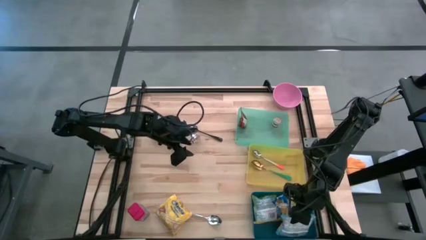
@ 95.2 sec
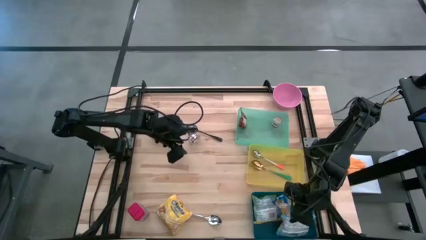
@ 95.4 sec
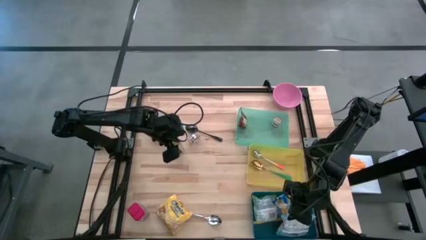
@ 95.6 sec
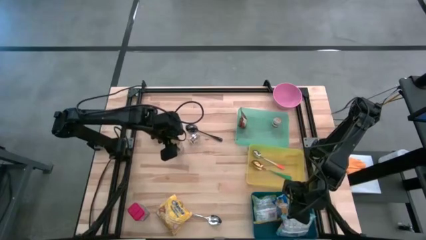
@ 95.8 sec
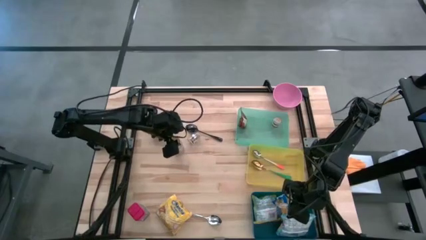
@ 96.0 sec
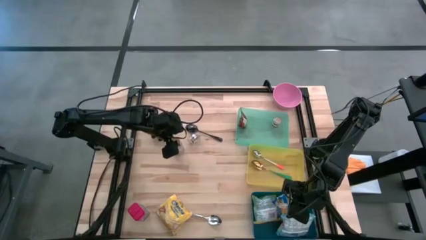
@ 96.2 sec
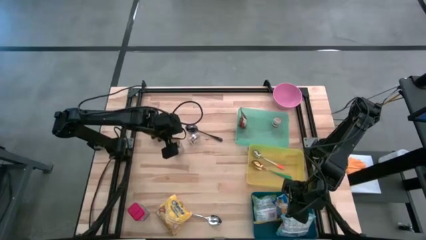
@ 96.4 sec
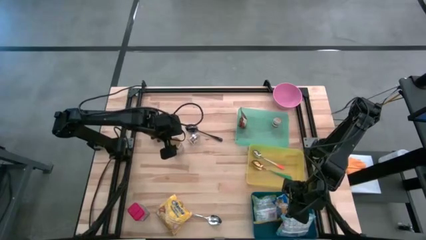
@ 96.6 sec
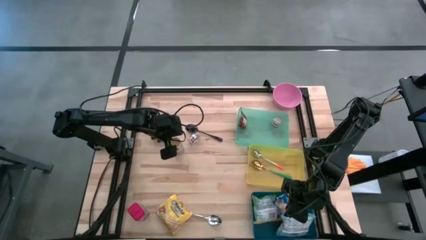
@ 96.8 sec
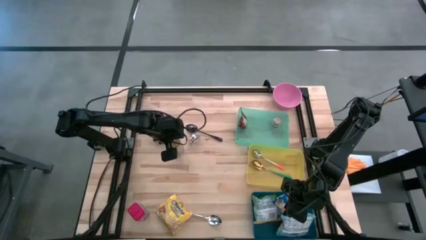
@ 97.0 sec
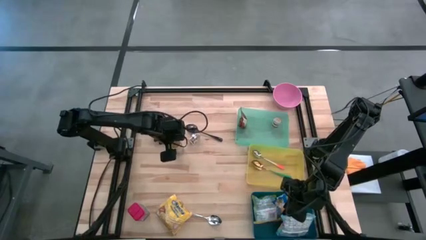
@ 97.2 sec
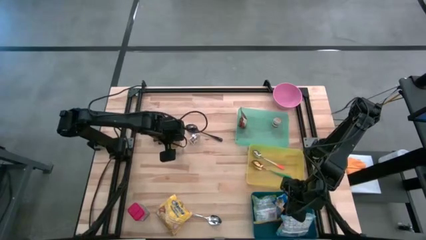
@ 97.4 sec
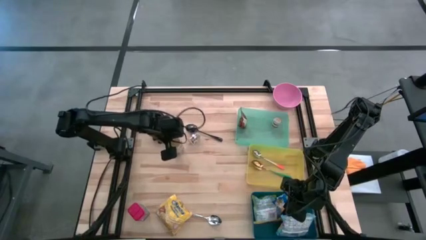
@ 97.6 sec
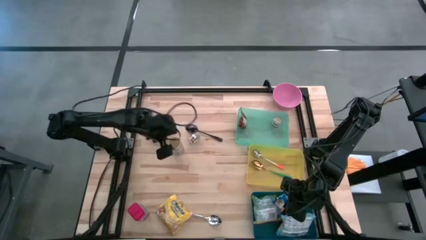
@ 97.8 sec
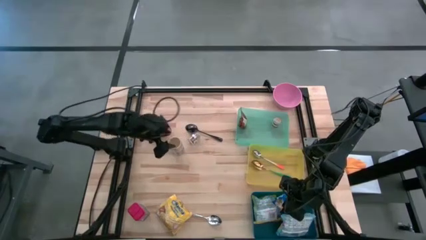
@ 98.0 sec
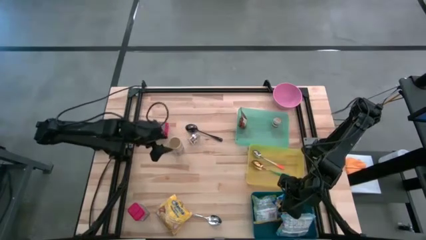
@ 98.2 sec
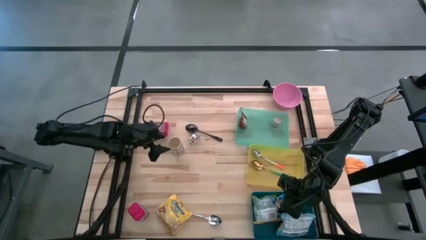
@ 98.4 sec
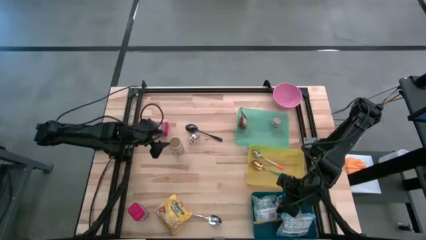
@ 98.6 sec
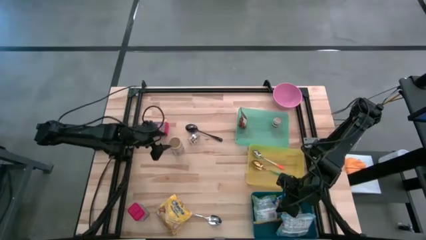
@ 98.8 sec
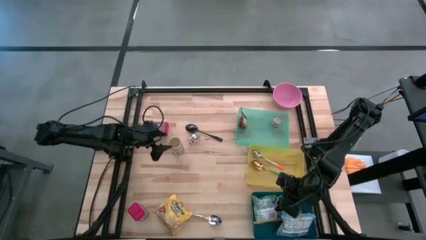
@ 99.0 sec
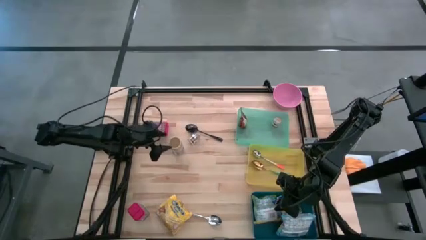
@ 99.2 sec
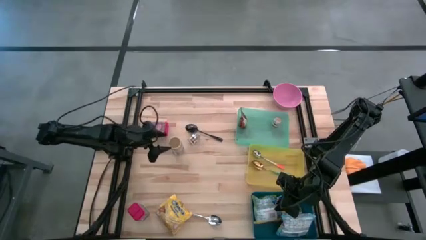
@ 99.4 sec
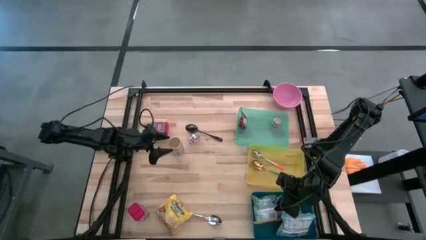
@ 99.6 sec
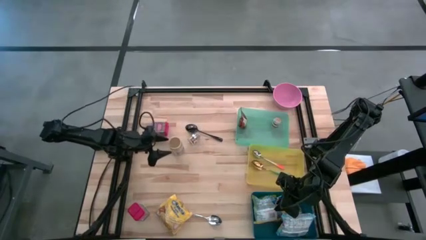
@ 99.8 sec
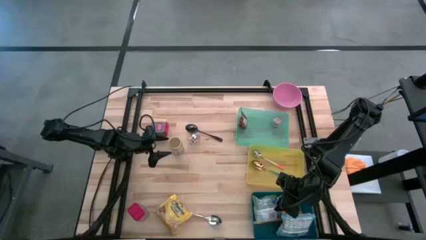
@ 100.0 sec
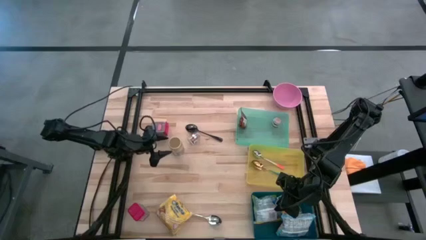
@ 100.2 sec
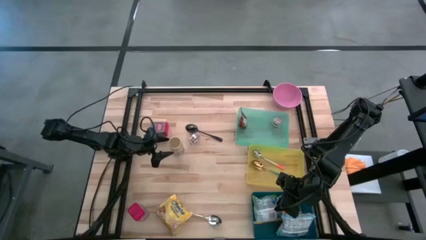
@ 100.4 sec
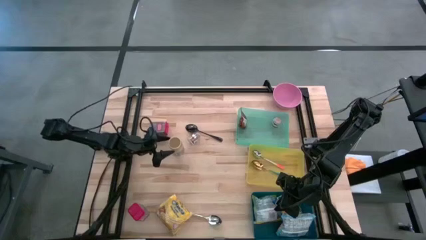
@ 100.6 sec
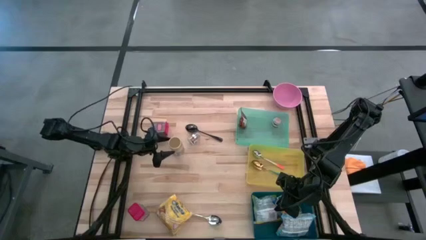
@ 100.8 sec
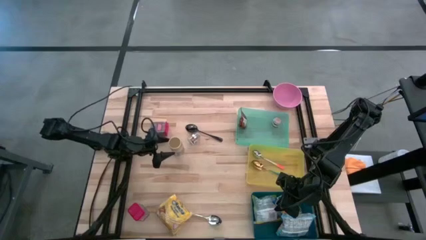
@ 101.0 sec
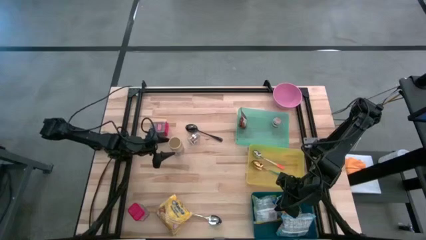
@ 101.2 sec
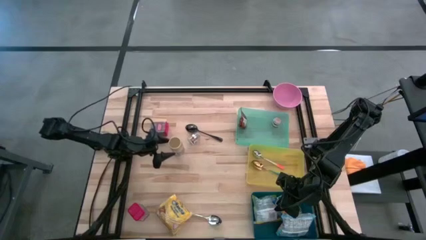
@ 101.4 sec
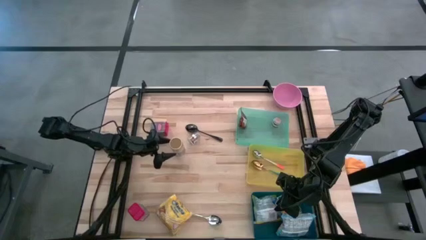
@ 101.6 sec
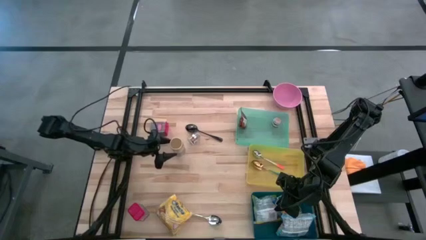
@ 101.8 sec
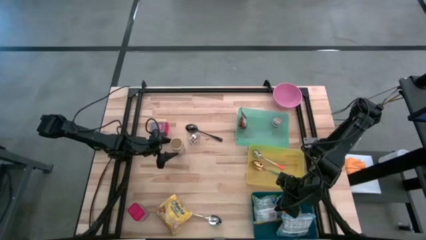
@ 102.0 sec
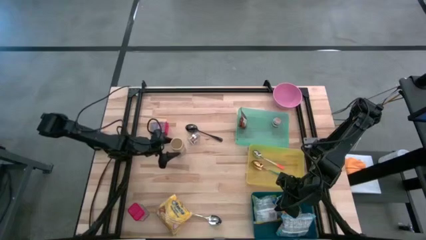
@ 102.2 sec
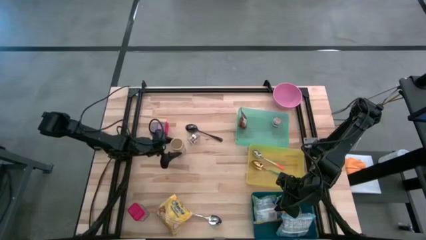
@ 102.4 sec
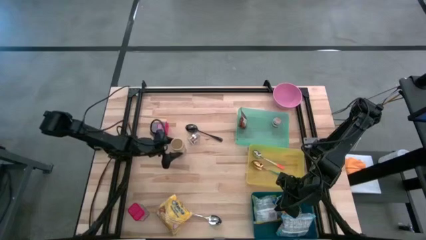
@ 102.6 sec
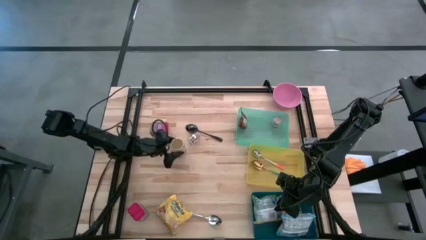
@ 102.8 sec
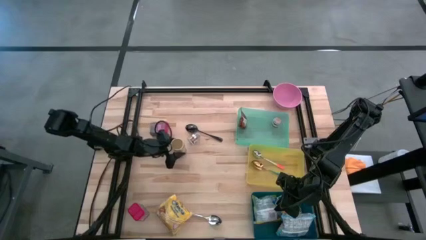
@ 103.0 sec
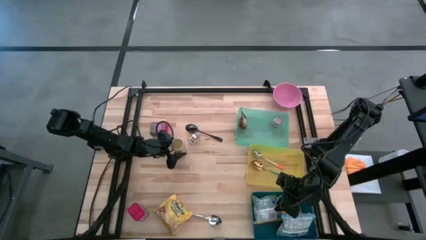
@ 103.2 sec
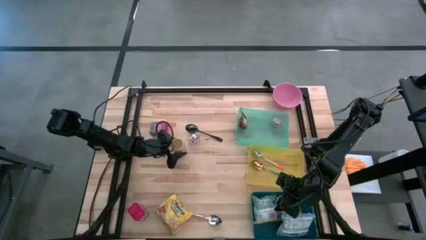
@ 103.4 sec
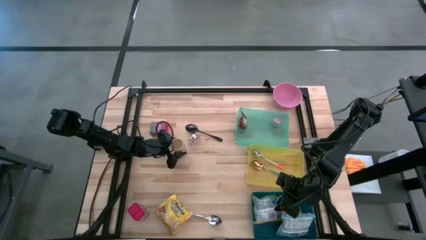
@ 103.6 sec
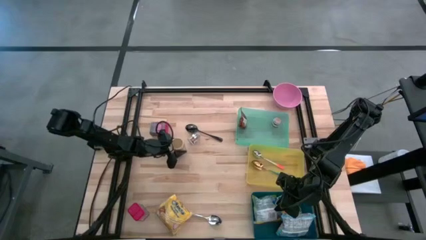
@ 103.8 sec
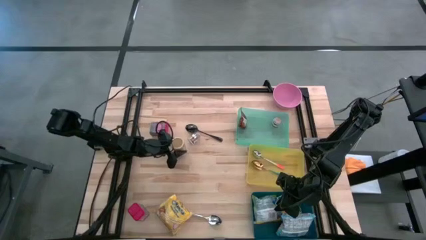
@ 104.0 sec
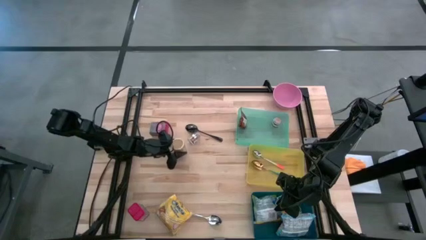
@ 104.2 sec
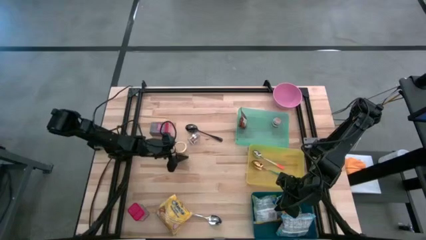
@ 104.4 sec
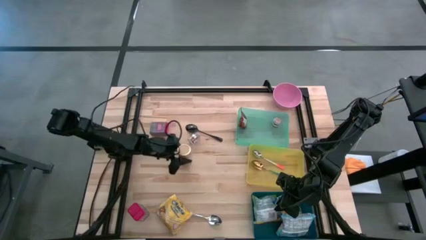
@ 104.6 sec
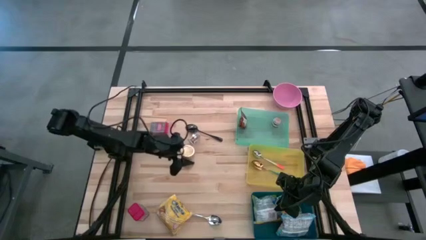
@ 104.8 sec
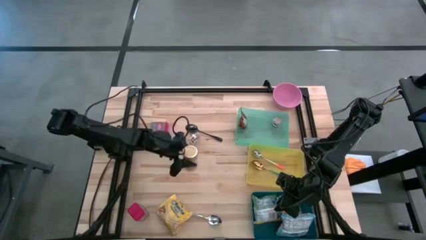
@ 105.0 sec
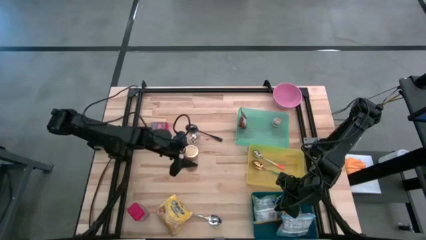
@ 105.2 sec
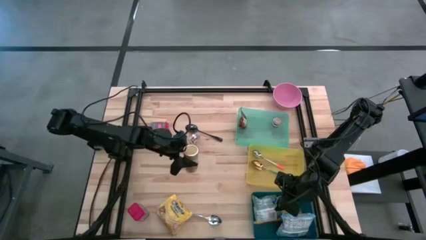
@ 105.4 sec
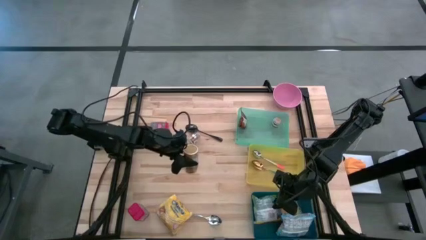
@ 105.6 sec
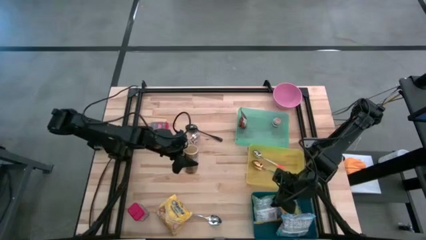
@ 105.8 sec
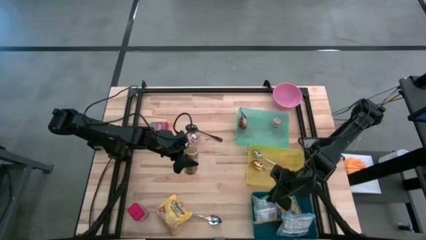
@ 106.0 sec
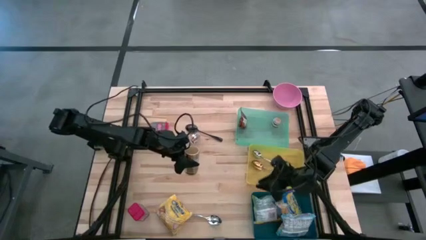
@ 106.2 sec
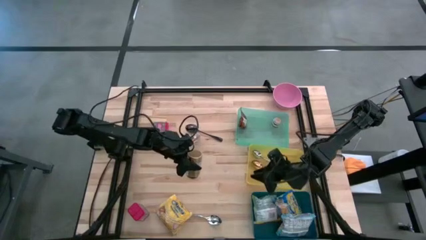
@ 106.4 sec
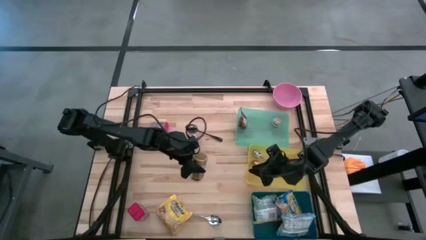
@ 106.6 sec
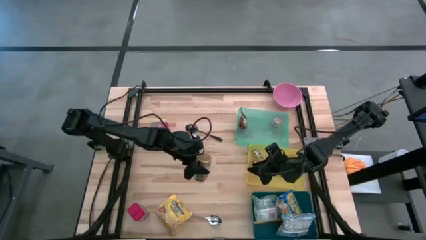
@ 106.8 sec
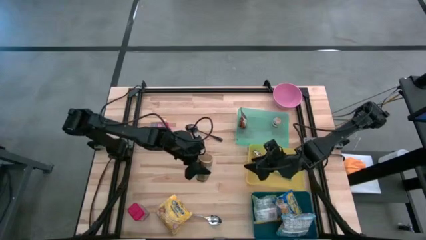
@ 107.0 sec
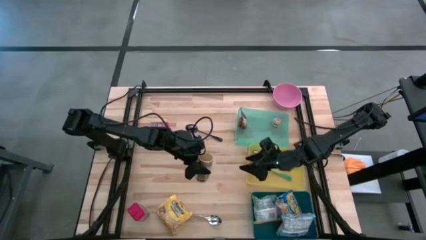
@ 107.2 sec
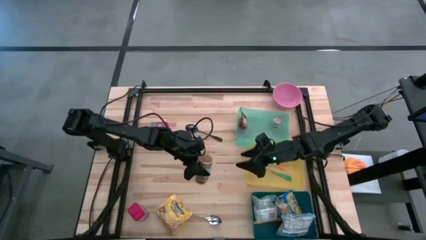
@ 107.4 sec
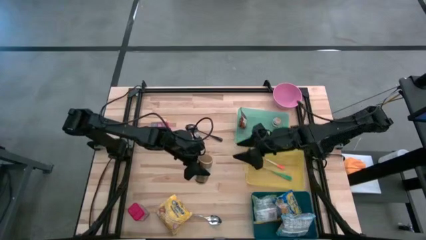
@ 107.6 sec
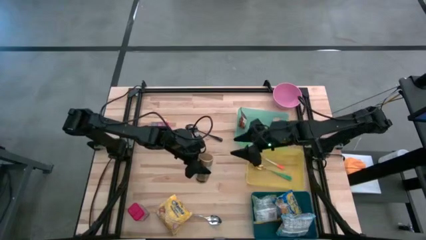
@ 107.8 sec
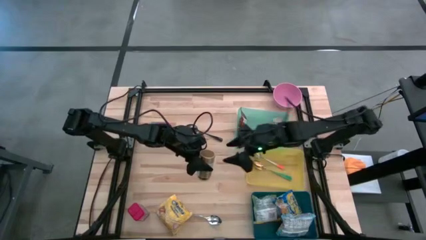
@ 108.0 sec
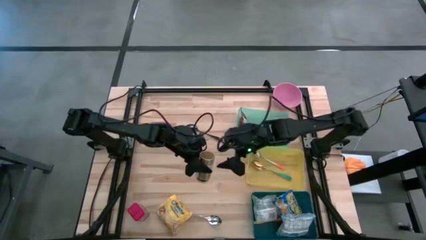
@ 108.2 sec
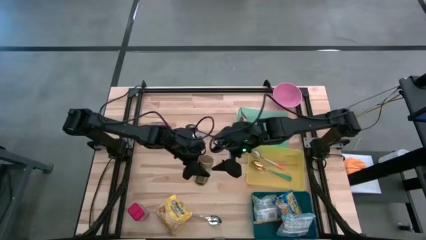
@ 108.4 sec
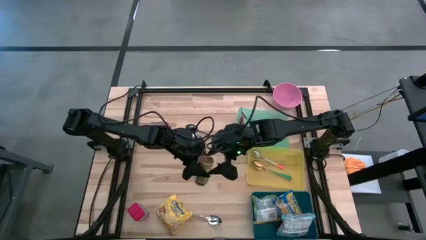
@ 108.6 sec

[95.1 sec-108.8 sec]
Put the golden seasoning bottle into the green bin
